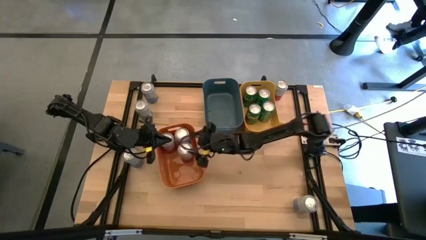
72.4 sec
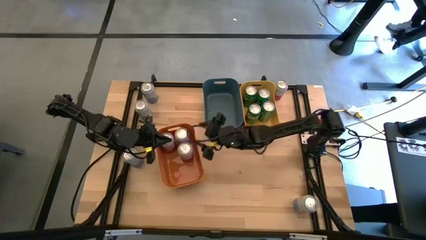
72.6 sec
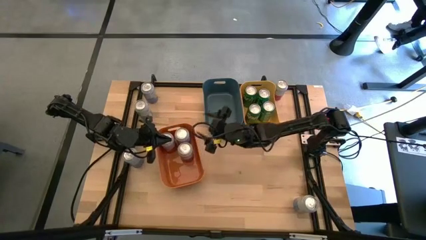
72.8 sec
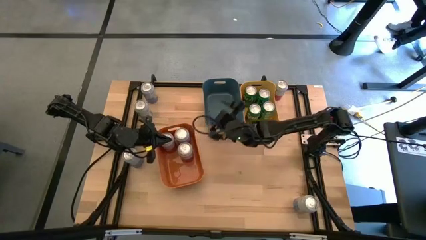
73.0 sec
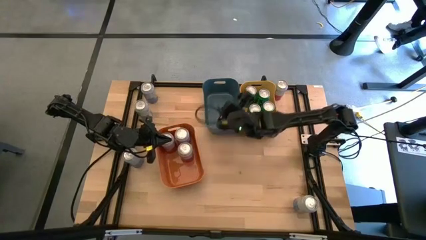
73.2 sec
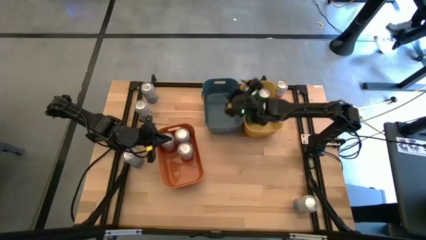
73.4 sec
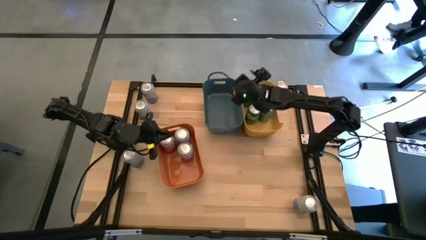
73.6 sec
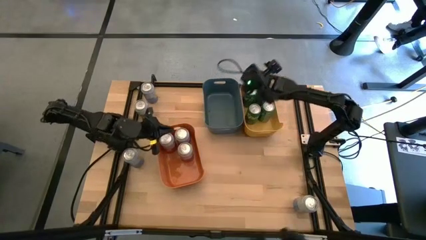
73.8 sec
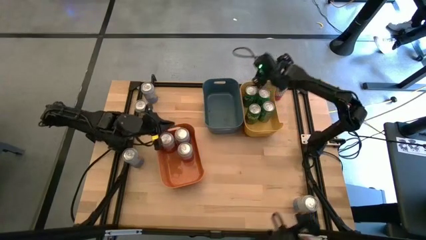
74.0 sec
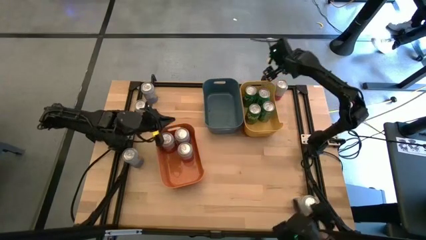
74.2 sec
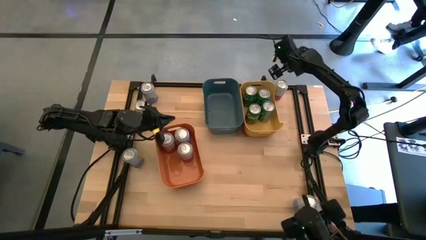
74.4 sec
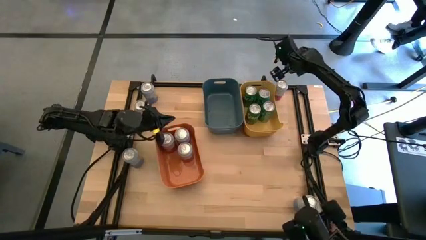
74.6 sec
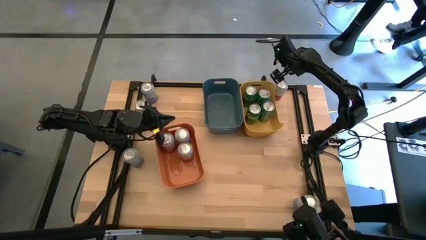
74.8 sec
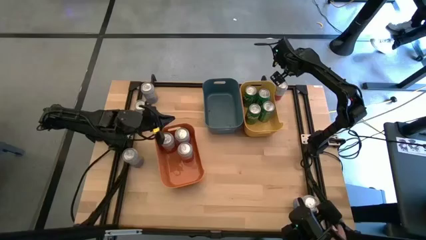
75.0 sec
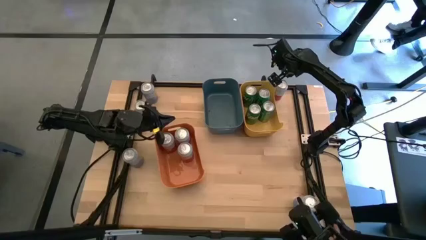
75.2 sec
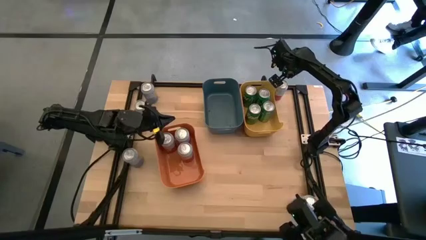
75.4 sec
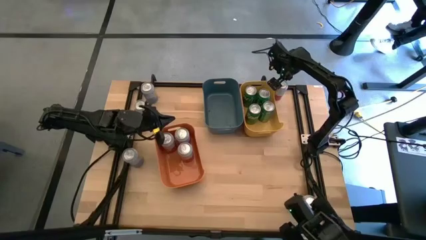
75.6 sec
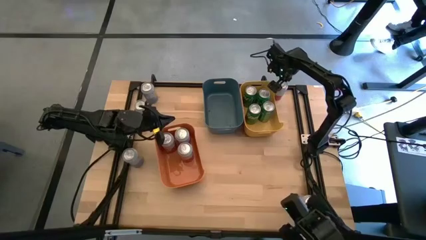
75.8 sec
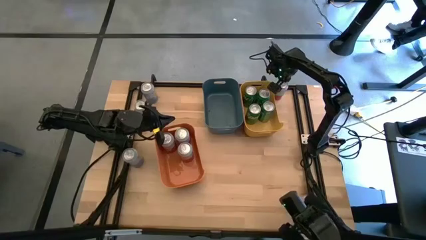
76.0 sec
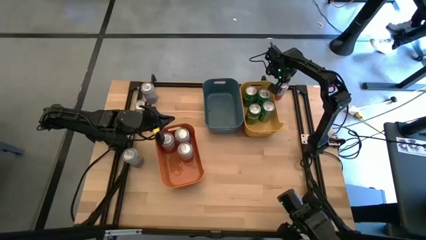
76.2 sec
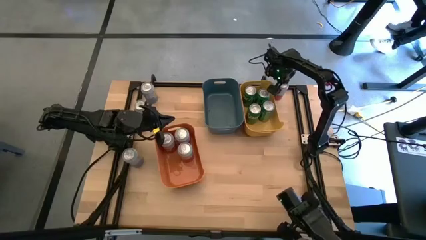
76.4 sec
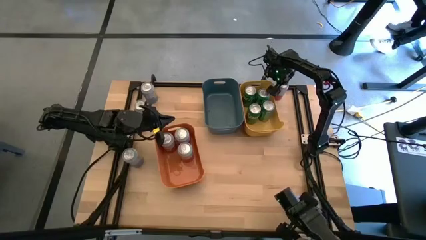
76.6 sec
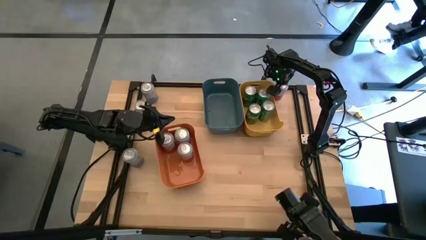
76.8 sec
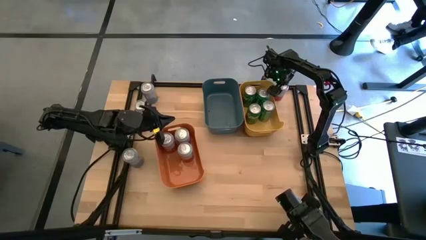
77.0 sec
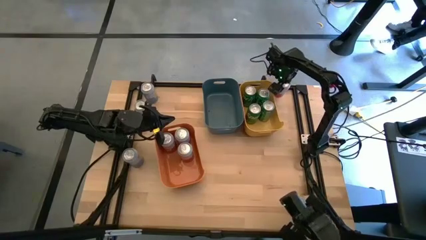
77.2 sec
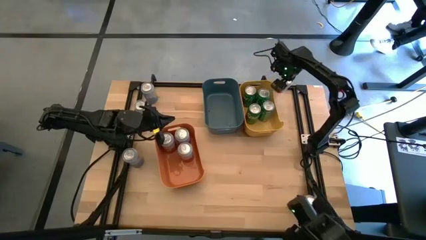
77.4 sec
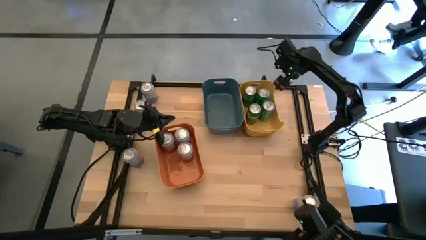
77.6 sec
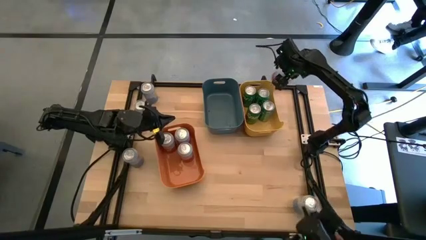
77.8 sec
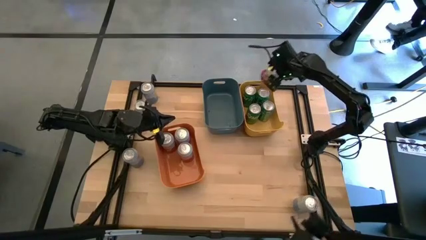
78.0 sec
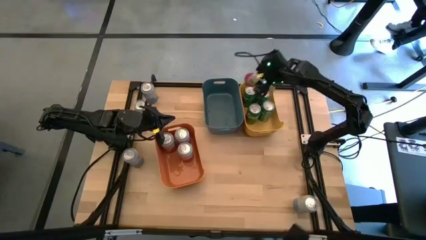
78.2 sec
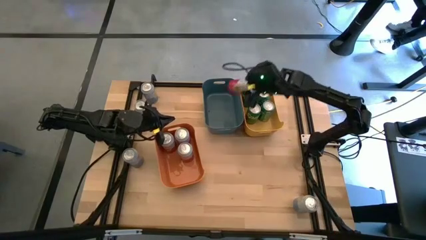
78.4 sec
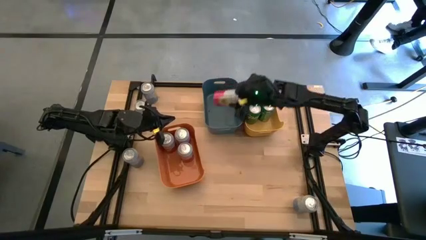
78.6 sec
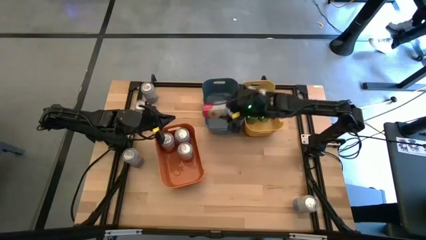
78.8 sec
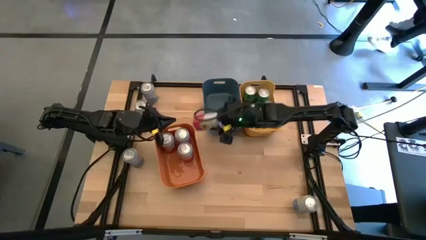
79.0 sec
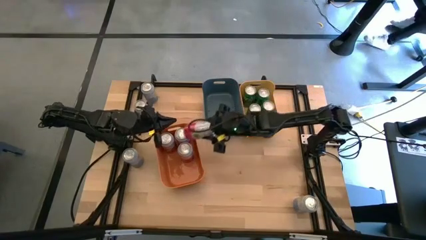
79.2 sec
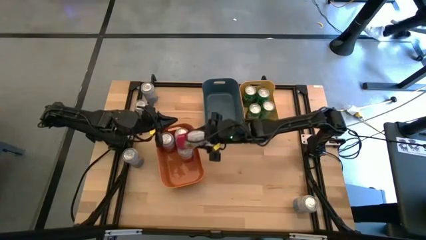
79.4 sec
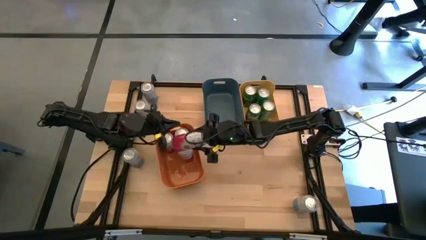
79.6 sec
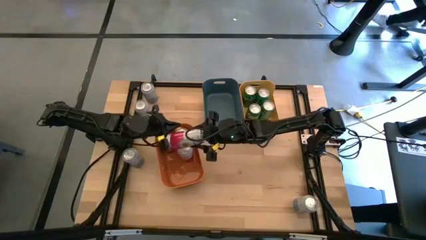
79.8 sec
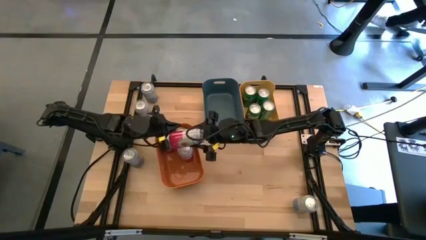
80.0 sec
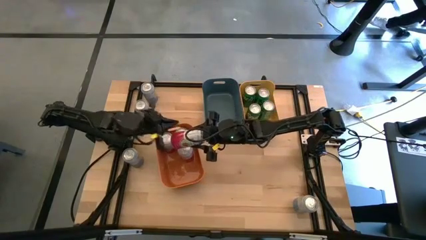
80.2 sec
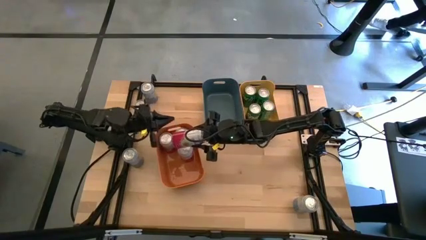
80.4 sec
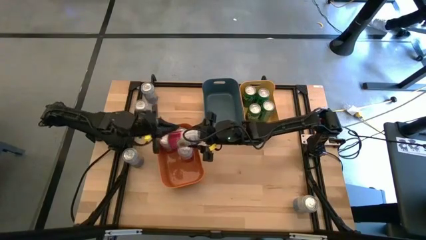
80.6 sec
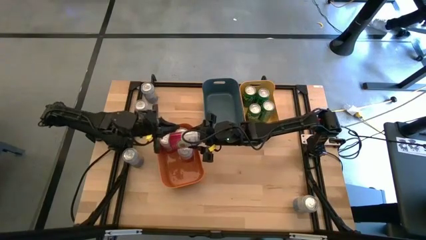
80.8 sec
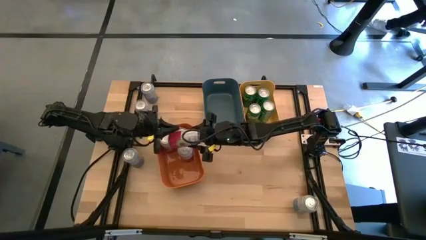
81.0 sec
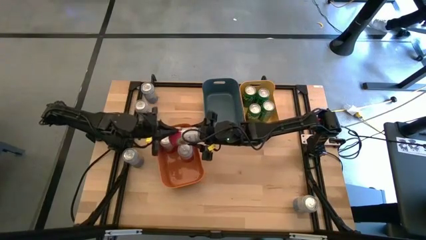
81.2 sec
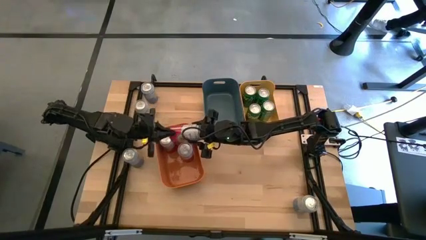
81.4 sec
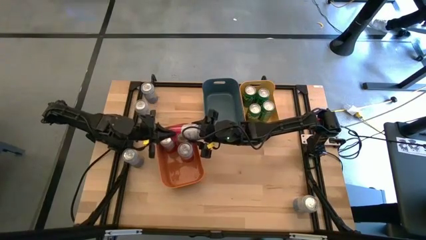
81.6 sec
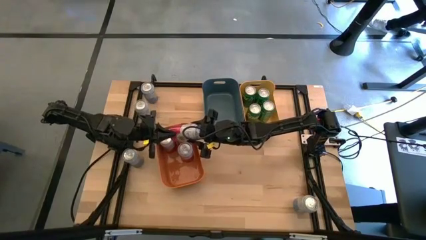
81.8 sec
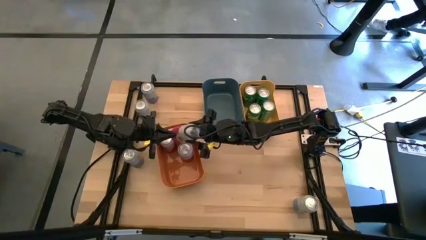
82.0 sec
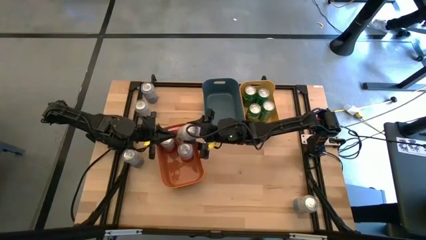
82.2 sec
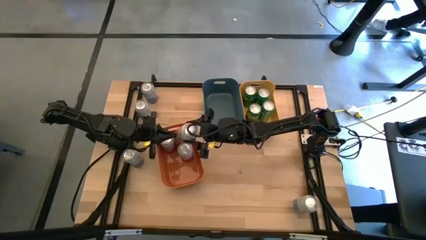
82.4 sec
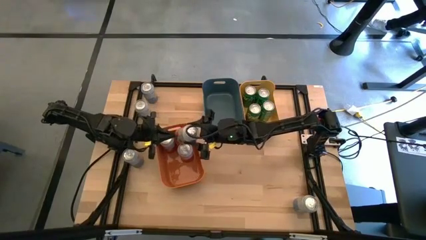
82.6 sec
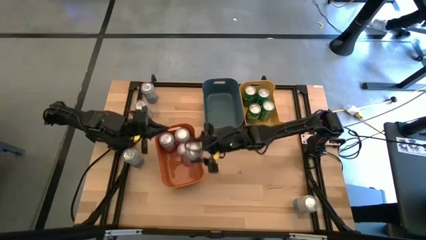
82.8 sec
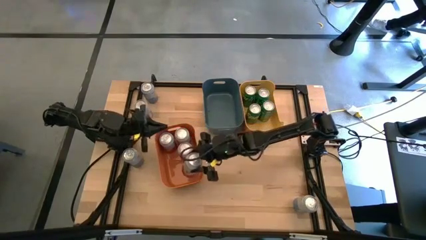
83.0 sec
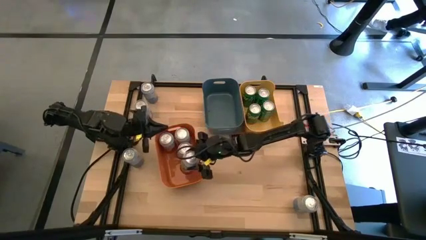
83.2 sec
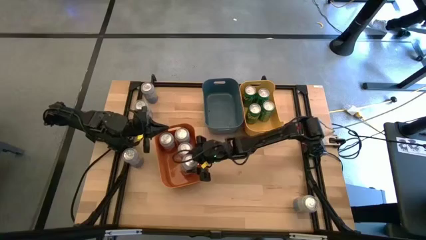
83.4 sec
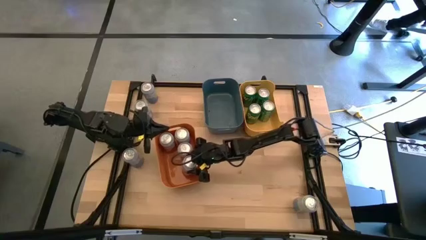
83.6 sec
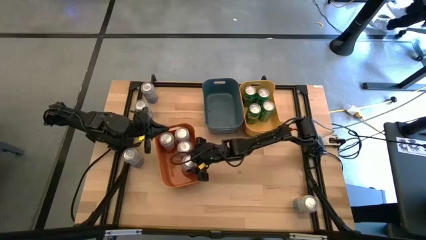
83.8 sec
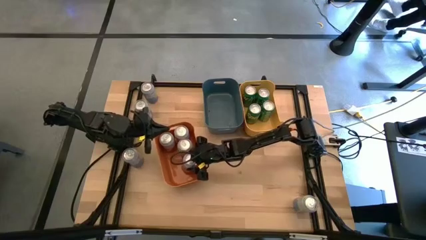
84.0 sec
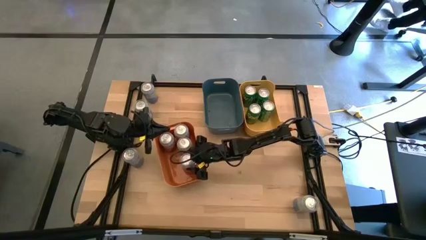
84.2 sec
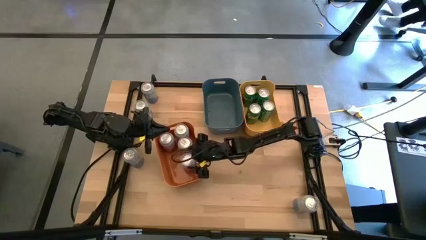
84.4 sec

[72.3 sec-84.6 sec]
Task: Sort soda cans
Put the pink-white soda can into the orange bin

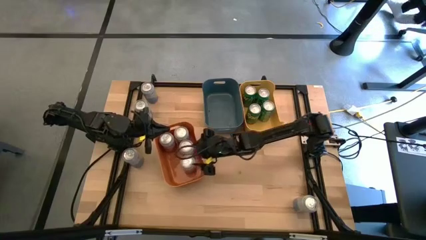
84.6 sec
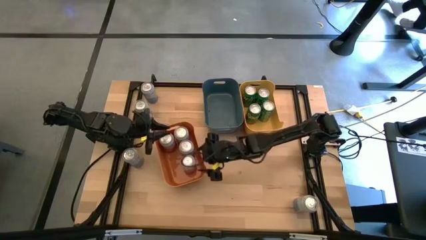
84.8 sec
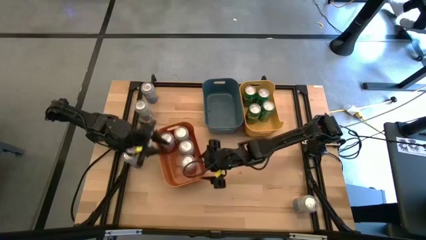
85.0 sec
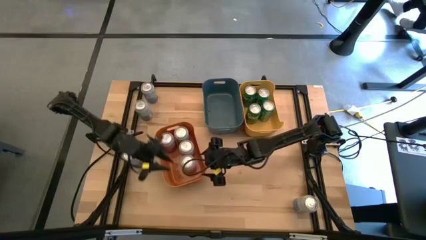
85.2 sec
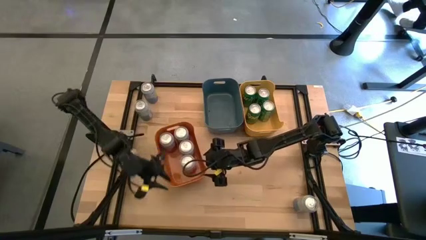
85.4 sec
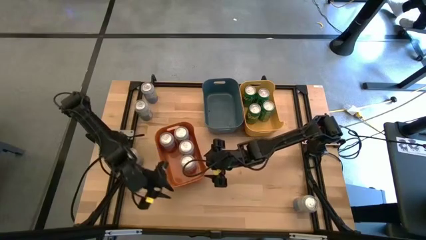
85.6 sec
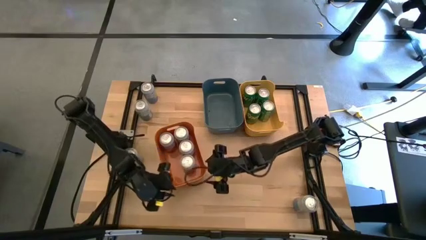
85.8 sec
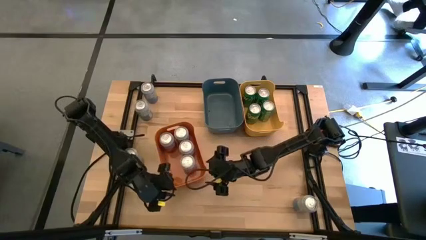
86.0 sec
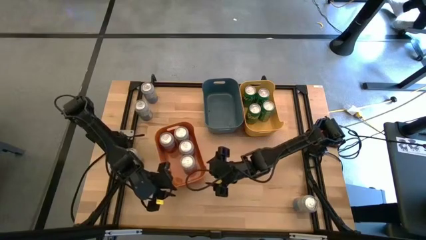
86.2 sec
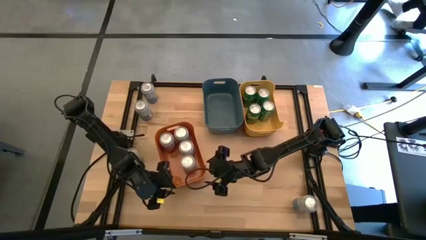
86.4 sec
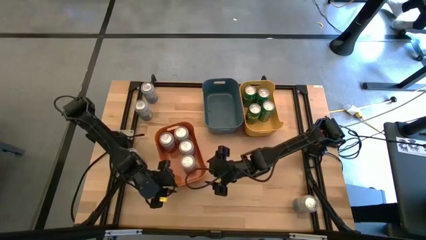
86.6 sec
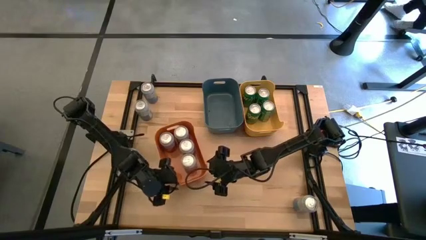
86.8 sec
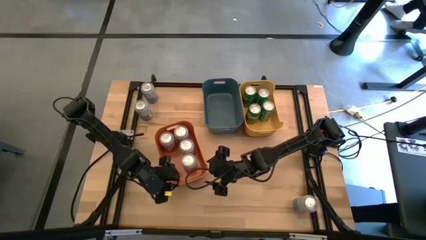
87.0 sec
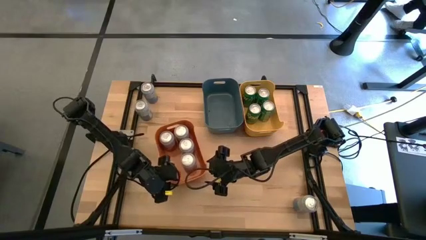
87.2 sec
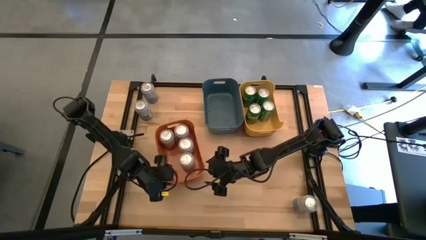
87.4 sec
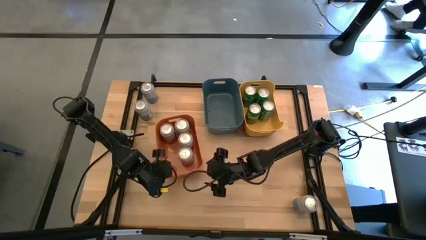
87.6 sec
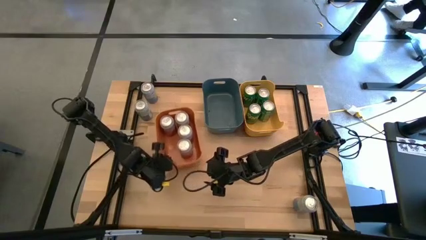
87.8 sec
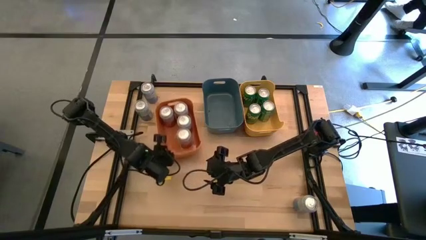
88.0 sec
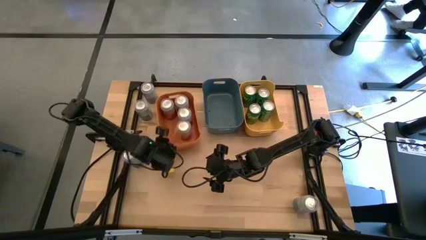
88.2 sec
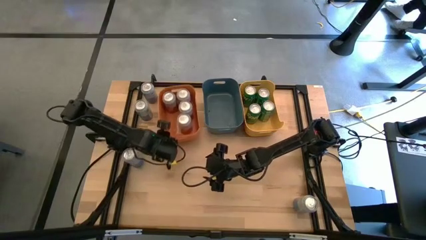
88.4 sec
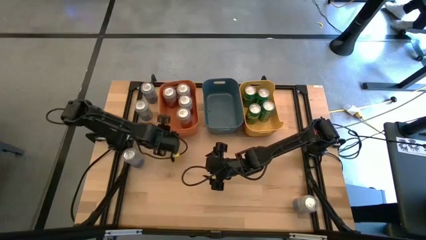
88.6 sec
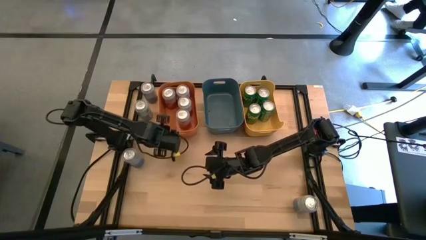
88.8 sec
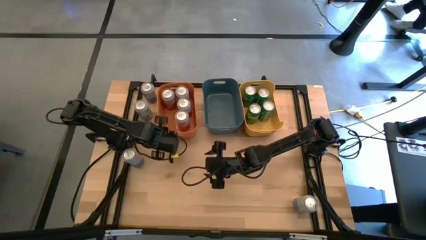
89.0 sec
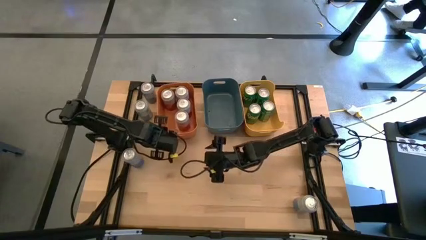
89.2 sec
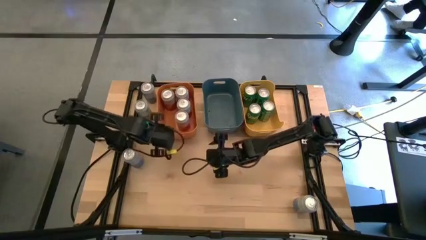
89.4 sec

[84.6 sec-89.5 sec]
Move the orange bin to the top left of the table
